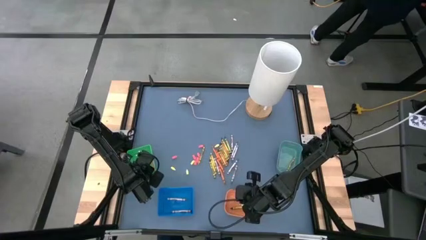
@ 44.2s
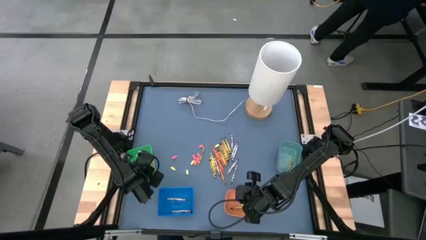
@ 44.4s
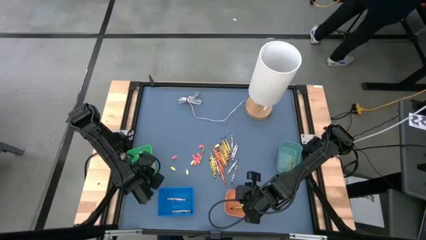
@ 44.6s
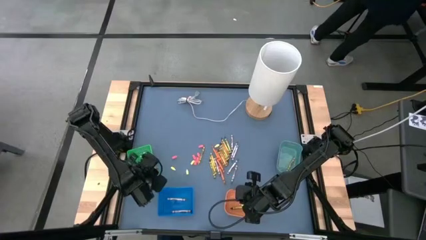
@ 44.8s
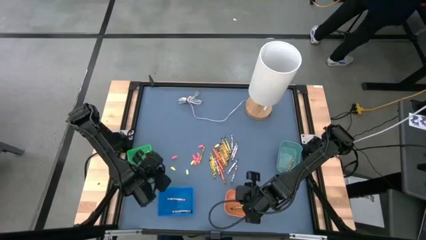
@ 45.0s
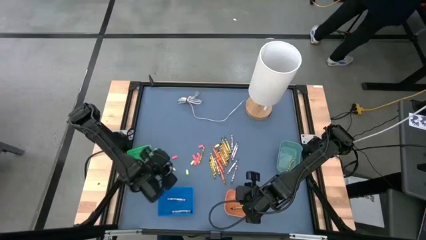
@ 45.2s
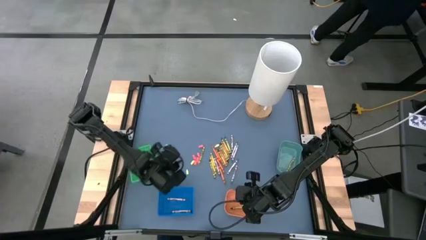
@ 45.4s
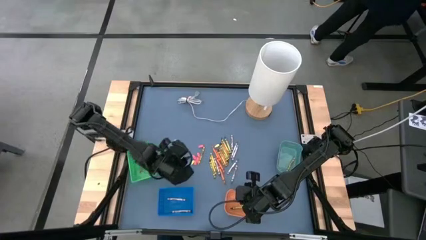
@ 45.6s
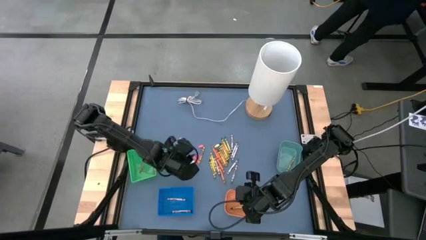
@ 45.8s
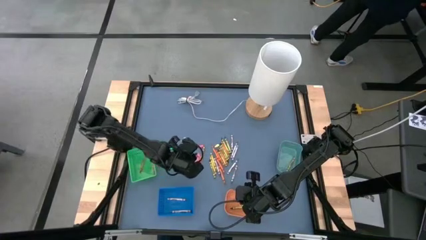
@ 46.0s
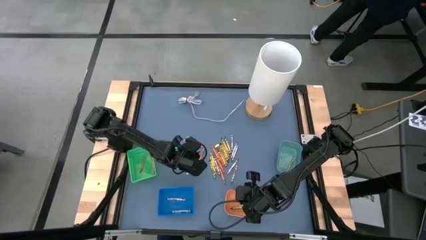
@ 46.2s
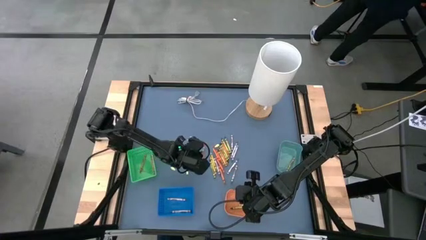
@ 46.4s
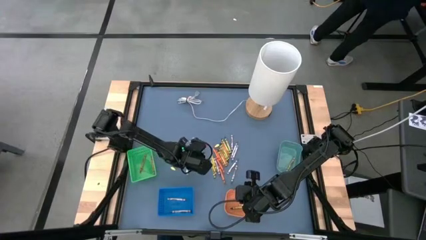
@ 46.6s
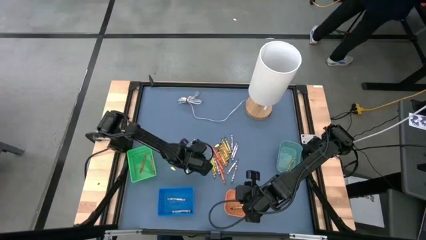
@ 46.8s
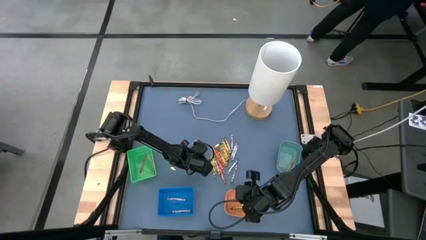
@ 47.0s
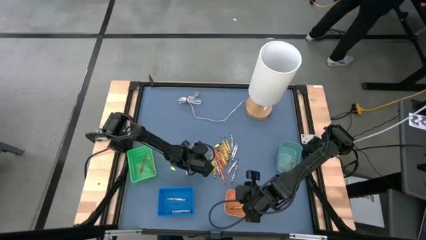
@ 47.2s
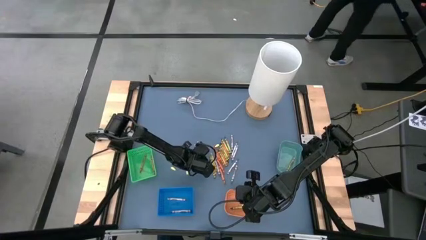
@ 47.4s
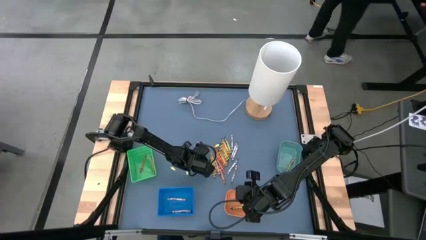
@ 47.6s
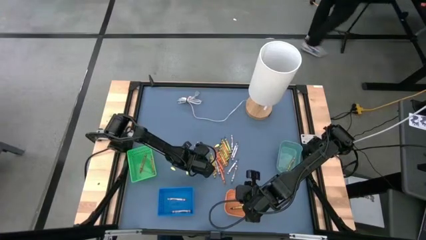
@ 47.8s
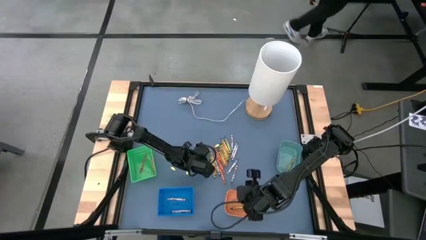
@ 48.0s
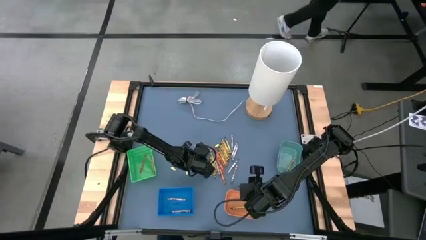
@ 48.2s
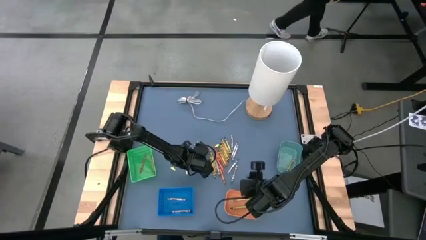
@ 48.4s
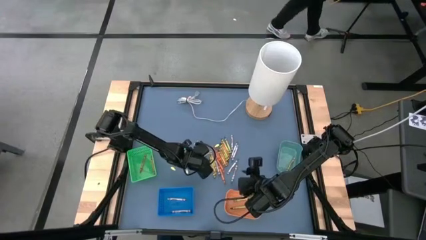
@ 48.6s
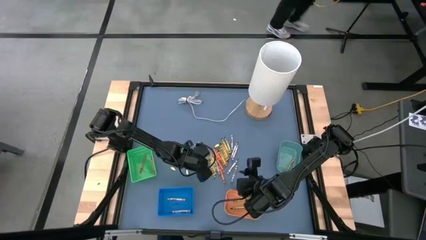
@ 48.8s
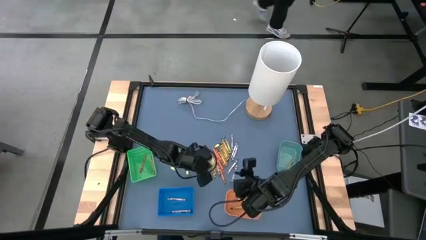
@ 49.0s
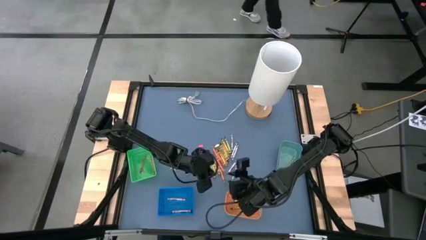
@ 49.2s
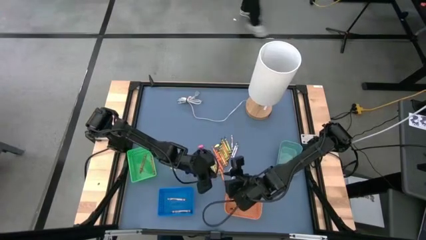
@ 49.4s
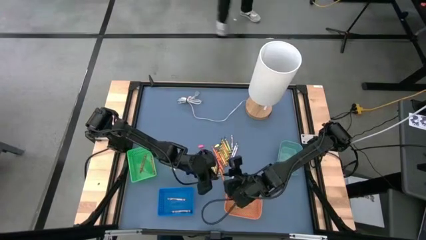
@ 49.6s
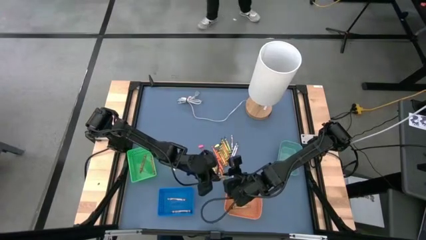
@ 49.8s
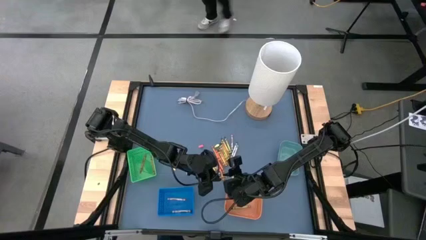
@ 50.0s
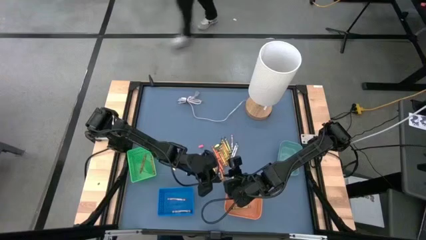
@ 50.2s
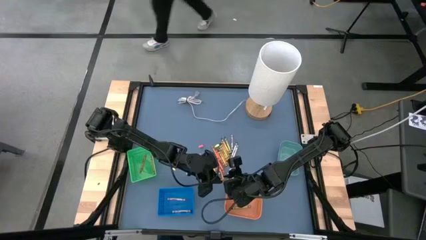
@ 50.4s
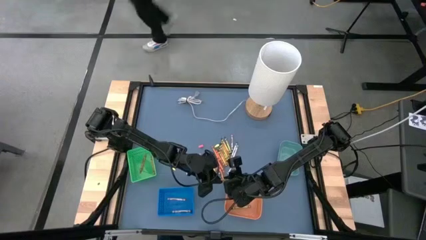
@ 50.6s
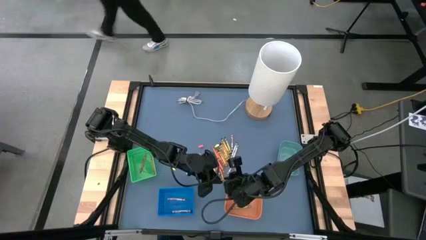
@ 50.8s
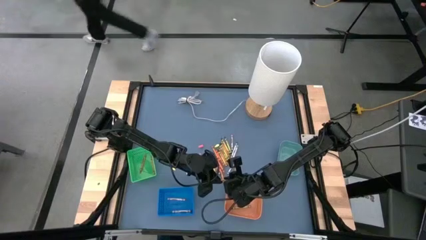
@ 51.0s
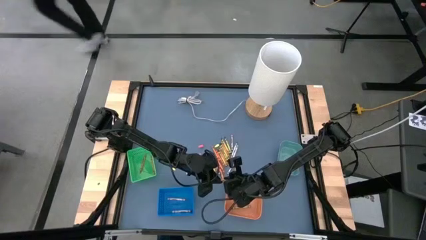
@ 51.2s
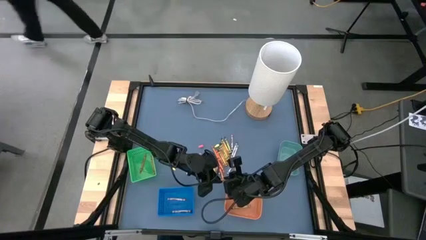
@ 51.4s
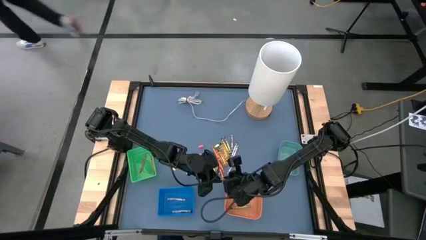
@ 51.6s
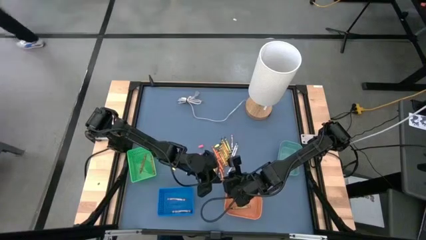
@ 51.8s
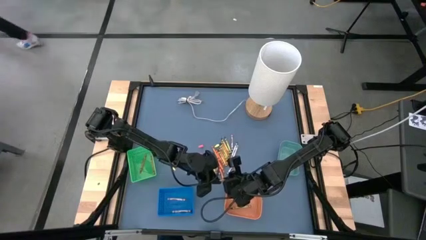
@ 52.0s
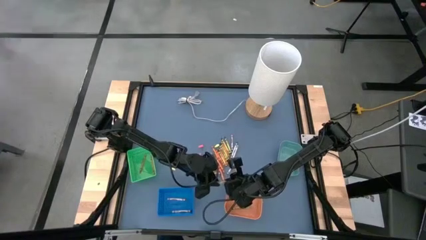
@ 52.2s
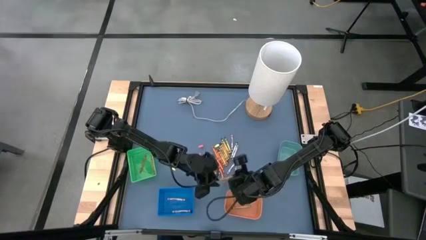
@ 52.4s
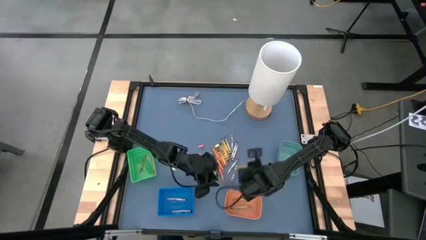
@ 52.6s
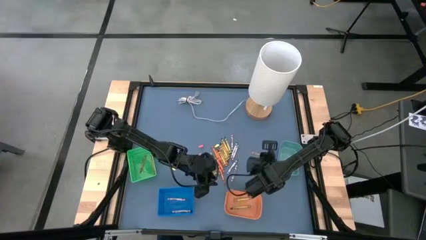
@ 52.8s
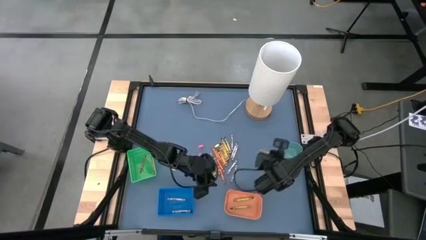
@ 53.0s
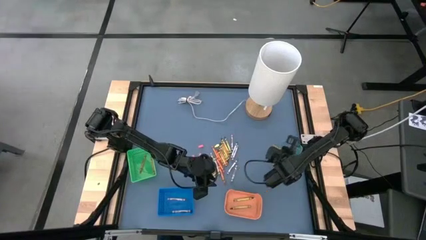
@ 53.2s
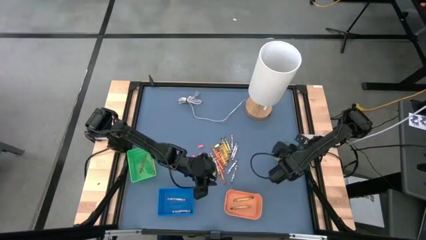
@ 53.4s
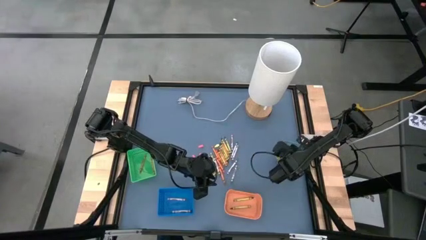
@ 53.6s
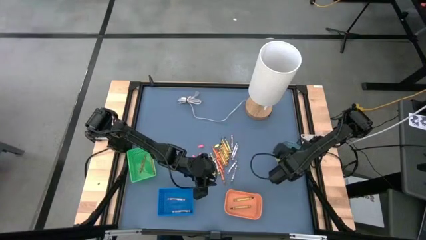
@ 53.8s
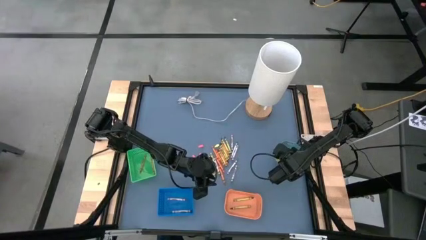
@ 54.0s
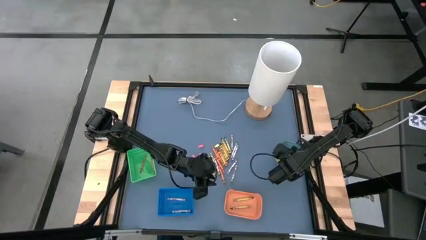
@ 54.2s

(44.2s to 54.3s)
Task: Sort crayons
Put the yellow crayon into the dark green bin

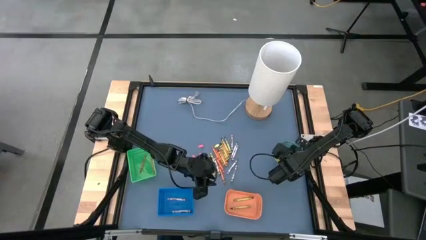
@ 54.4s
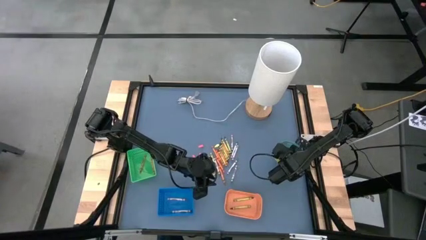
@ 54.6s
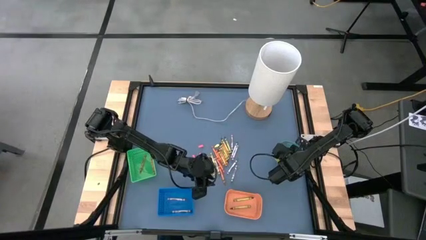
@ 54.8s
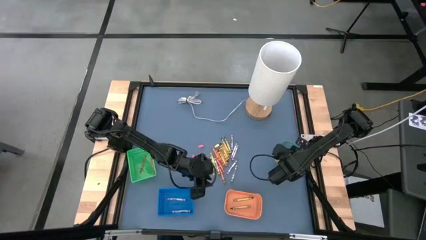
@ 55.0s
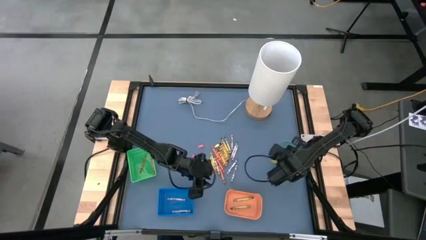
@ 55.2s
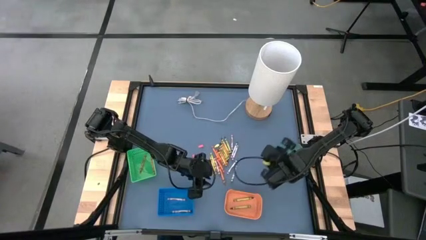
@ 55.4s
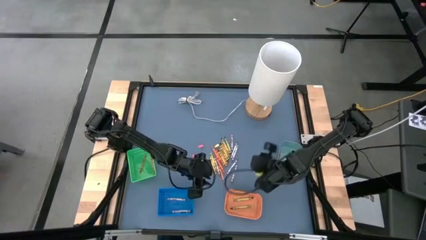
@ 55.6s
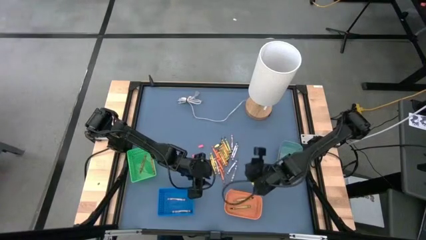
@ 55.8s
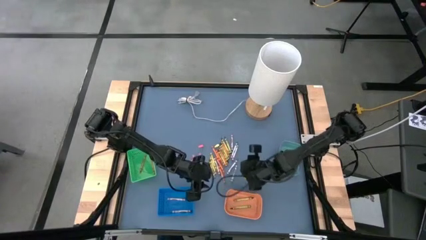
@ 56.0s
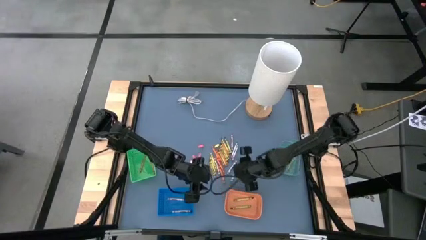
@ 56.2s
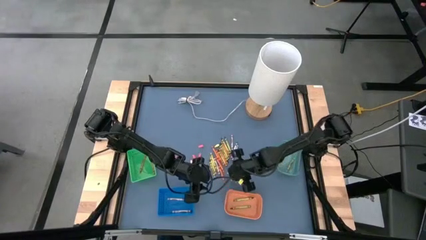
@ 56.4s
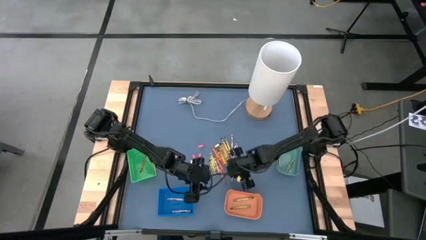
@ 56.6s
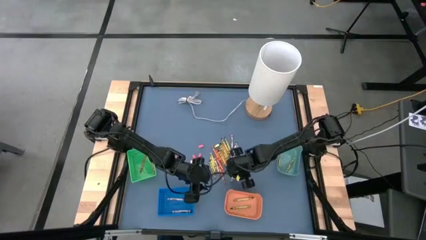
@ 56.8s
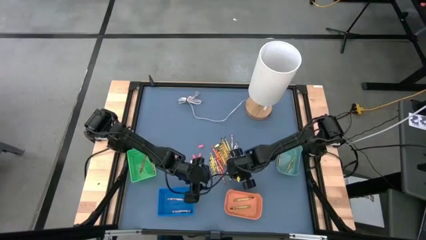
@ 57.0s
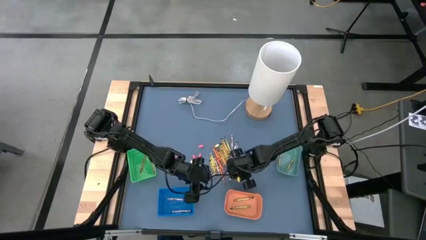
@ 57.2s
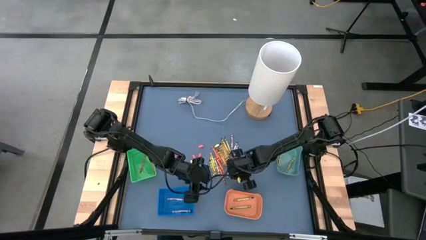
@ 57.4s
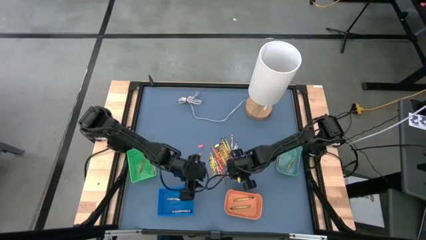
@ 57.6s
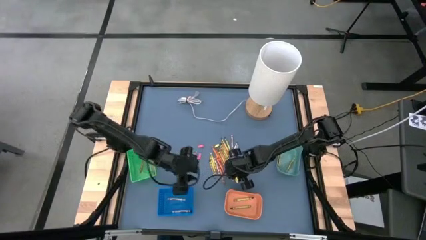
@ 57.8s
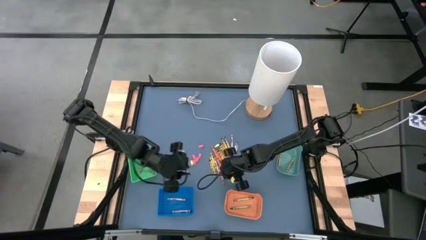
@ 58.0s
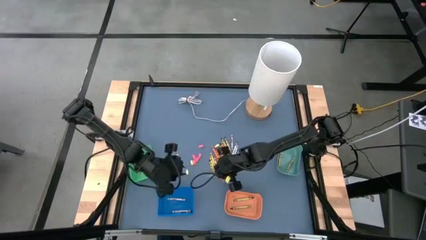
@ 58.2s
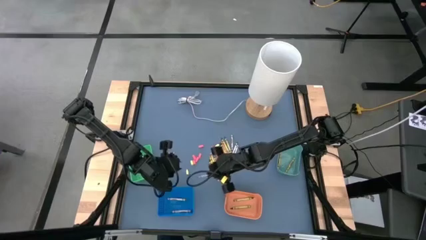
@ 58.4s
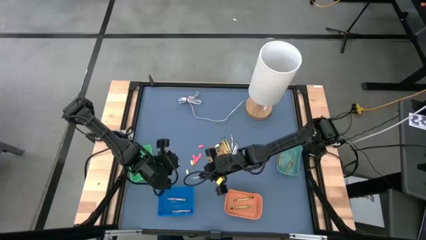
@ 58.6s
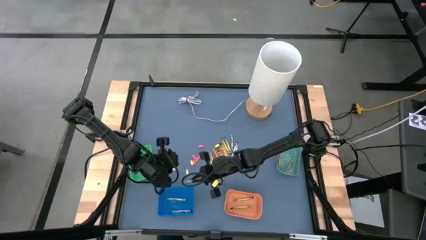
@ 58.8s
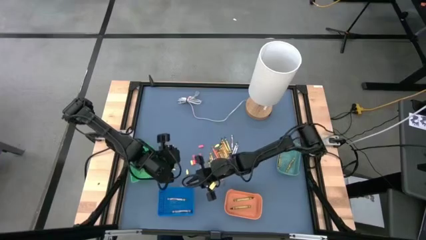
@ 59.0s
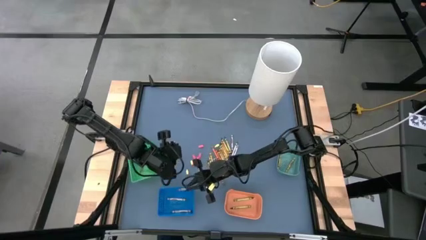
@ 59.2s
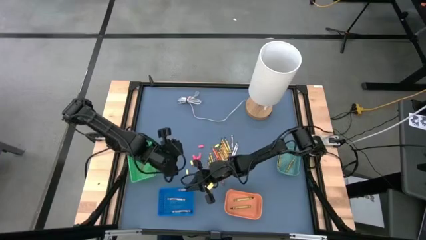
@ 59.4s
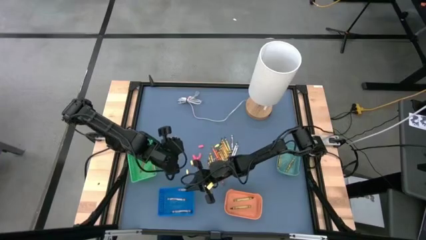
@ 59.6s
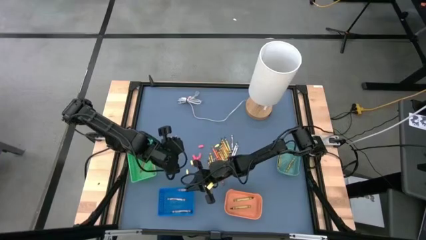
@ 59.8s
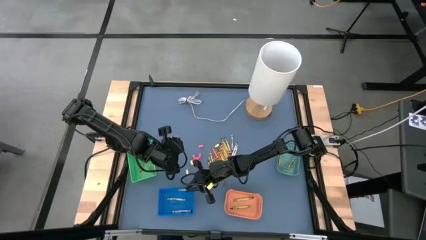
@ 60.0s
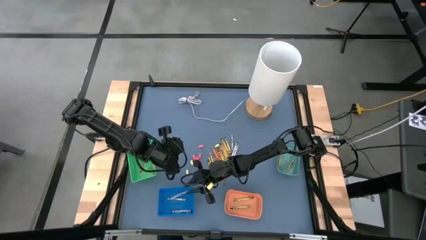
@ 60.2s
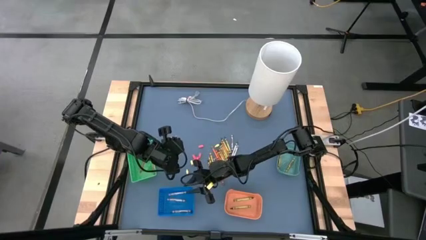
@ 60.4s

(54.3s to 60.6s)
Put the gray crayon into the blue bin
